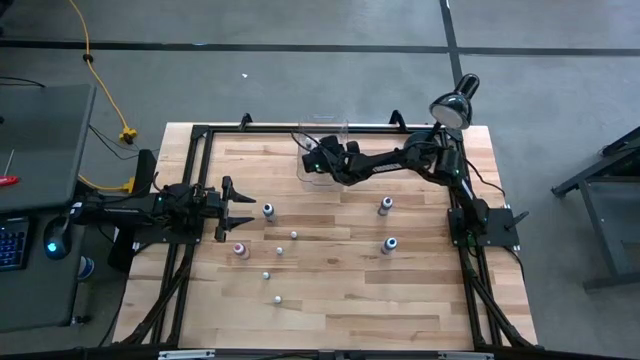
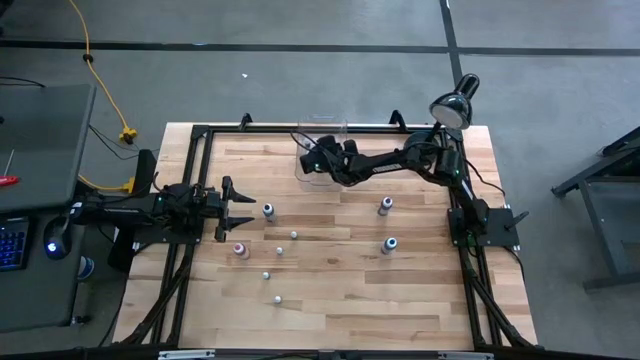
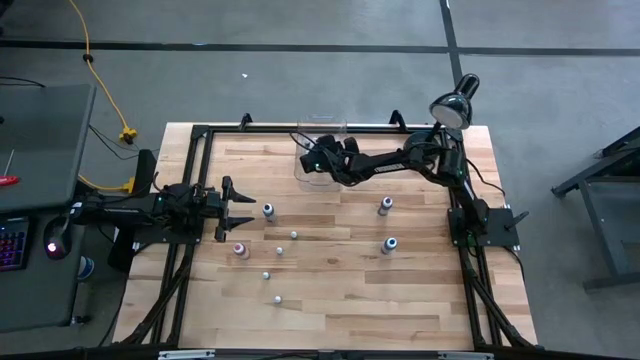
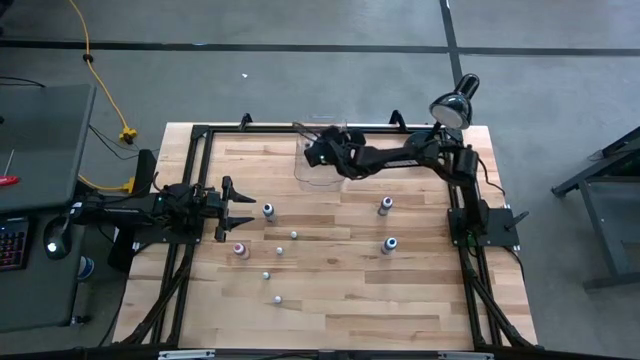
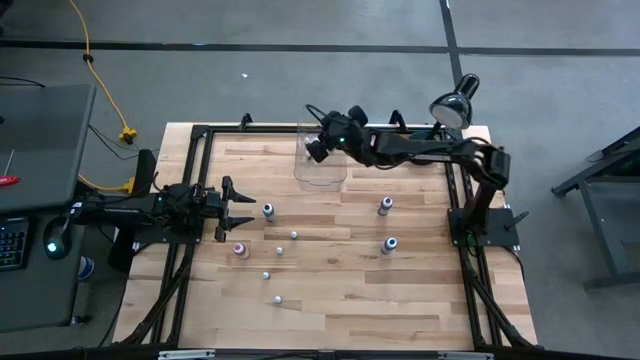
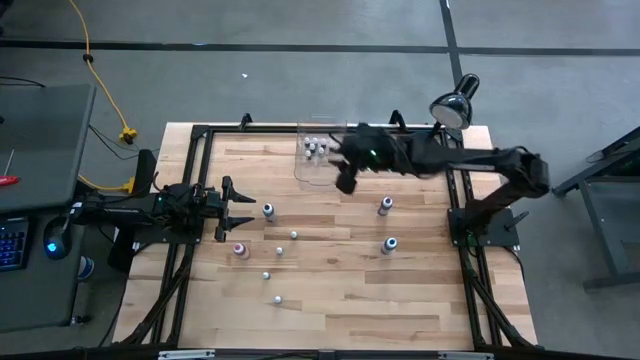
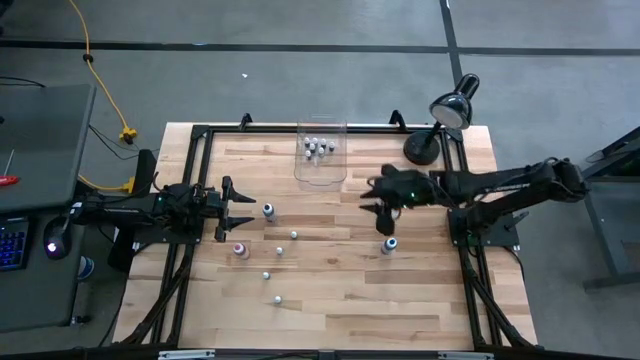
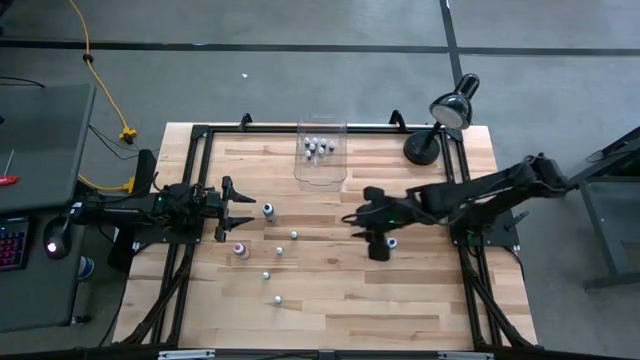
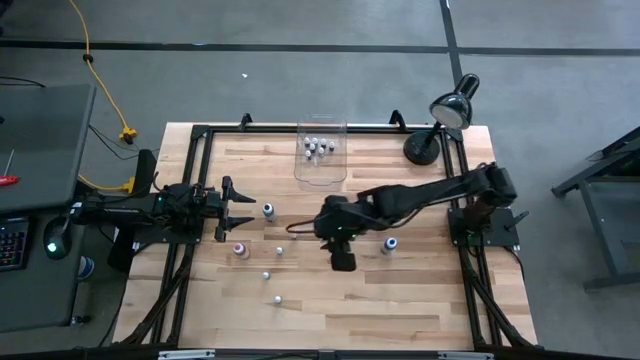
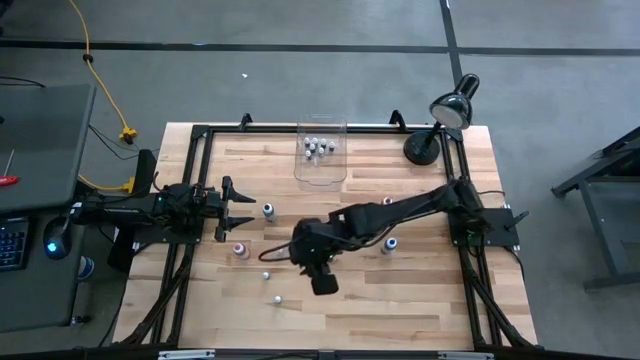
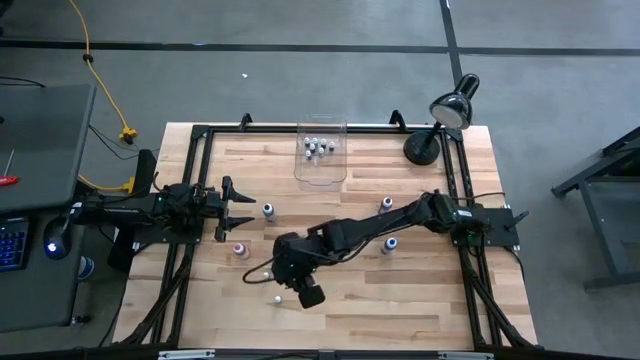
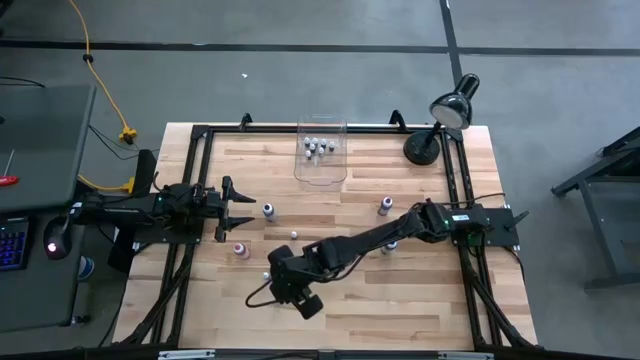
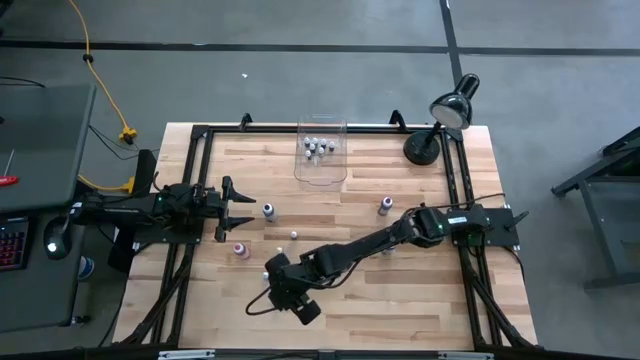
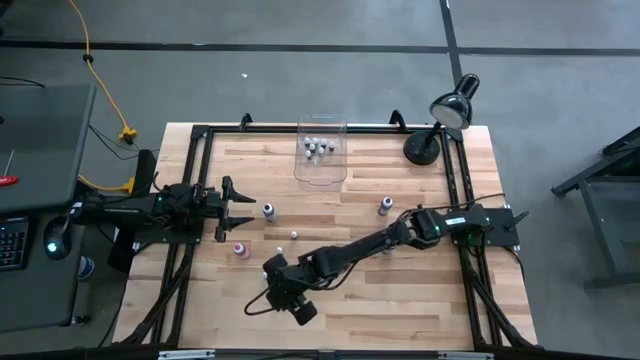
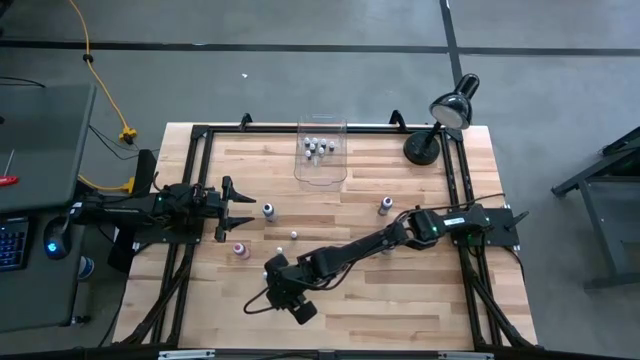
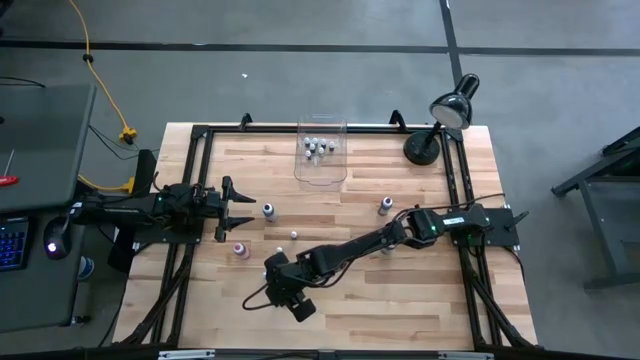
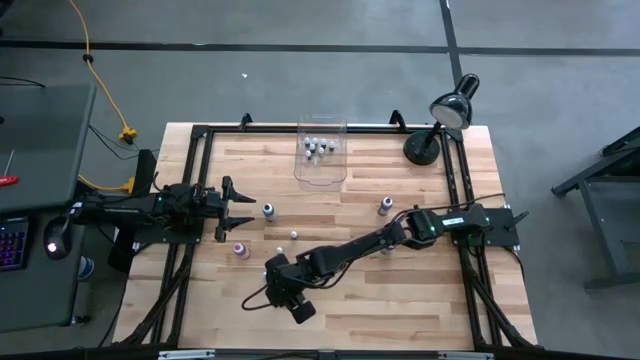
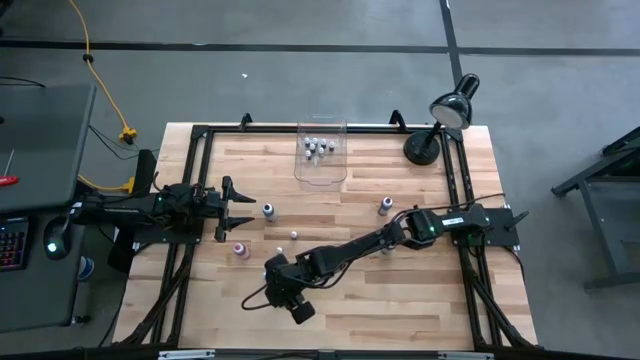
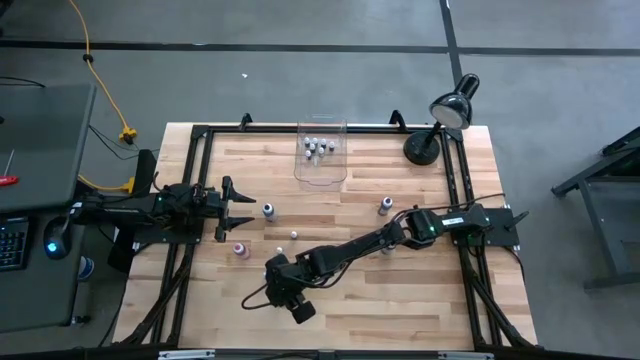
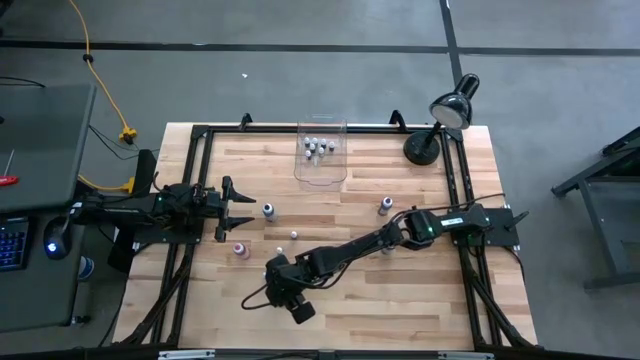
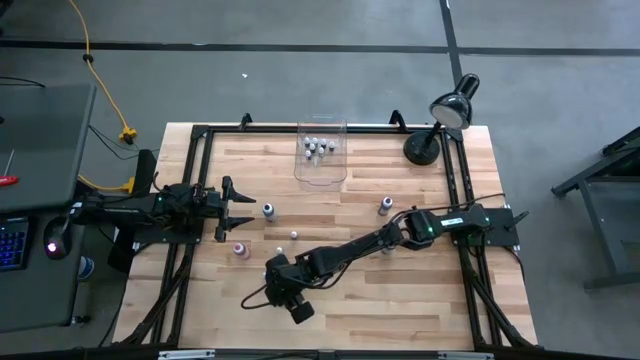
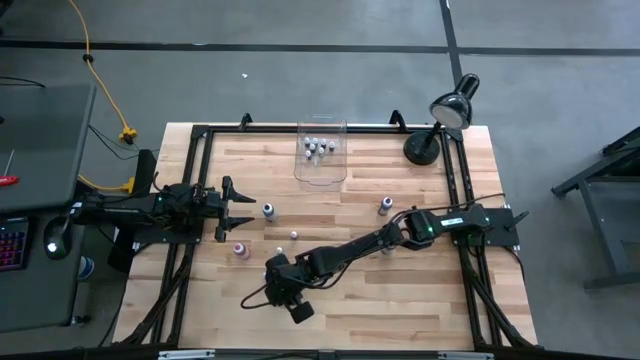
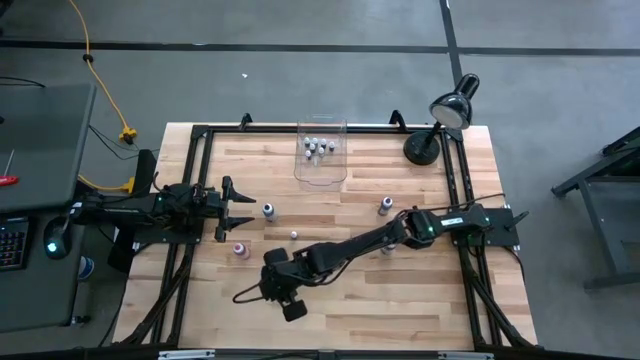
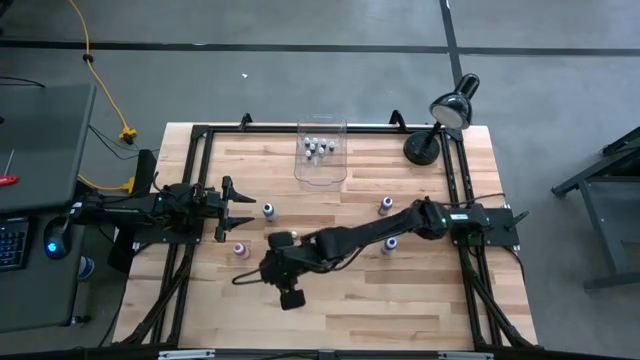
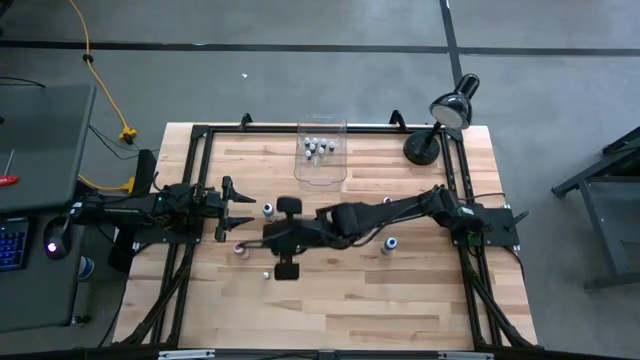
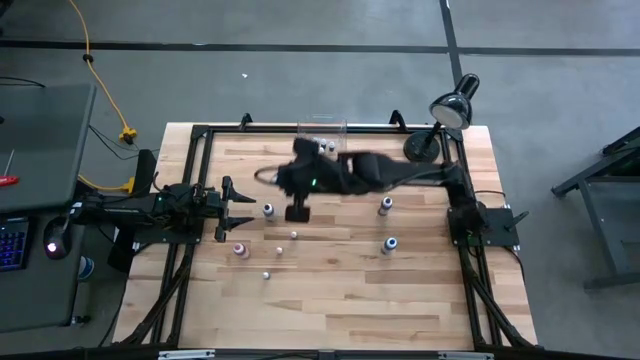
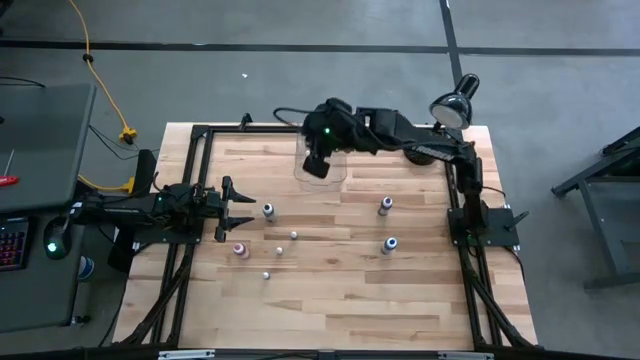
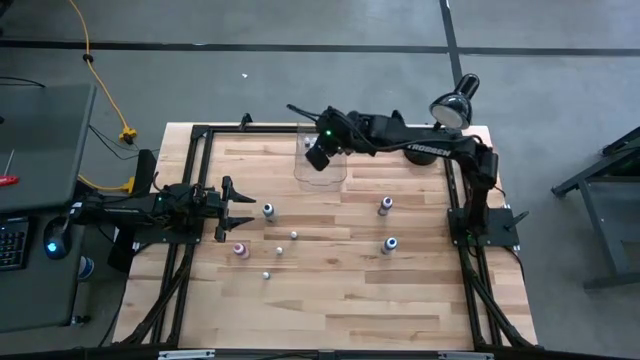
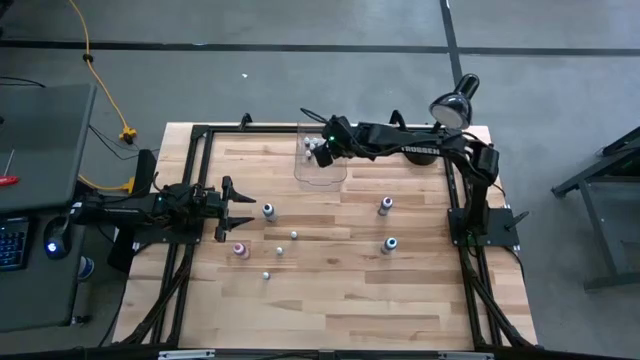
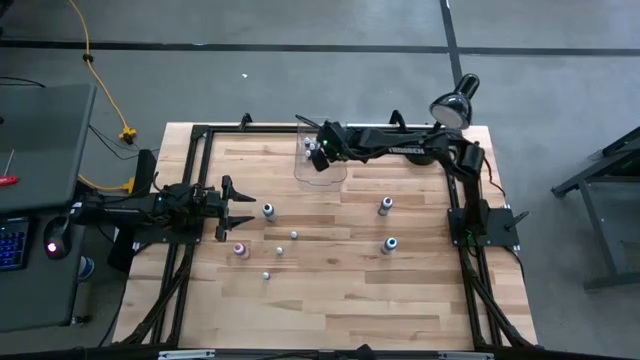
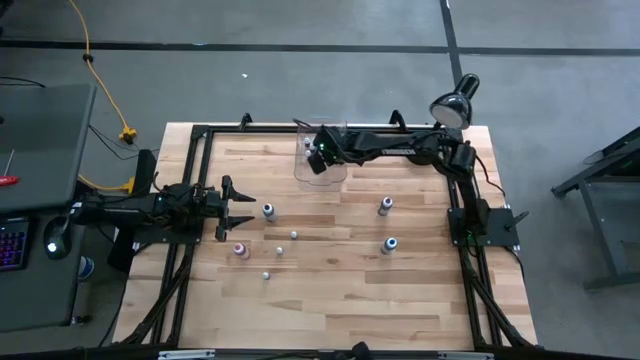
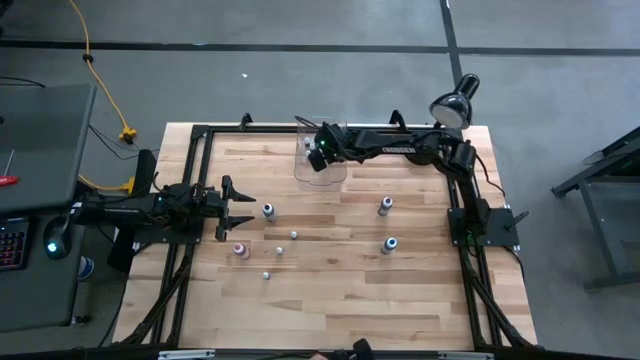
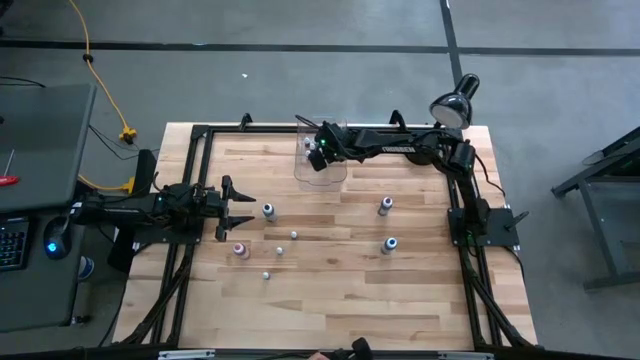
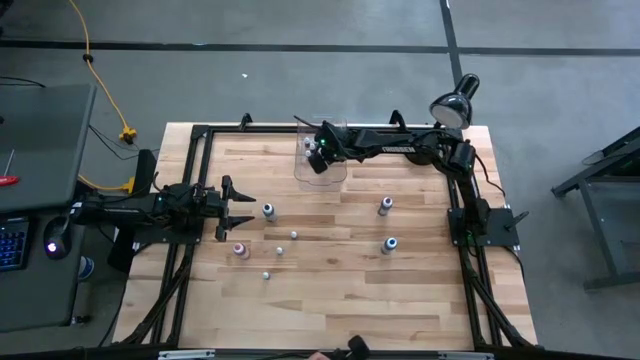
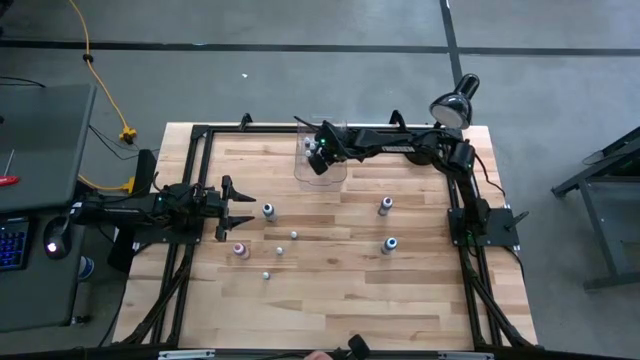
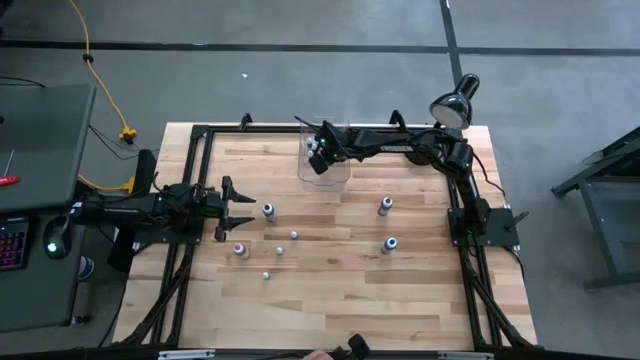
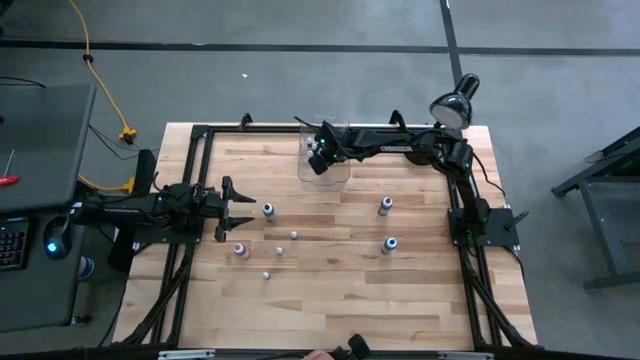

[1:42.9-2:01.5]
Task: Pick & Place food coloring
Put the small food coloring bottle into the transparent bin

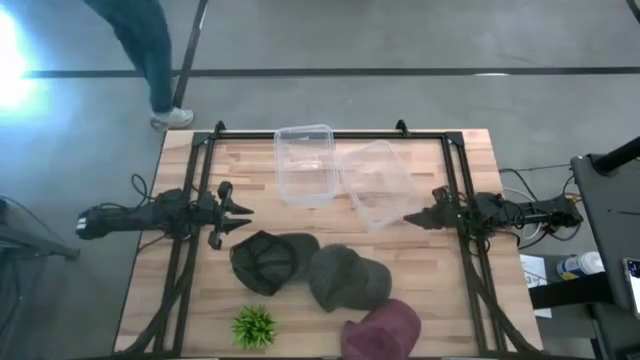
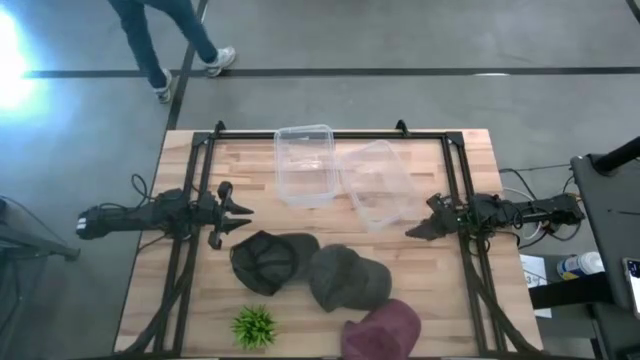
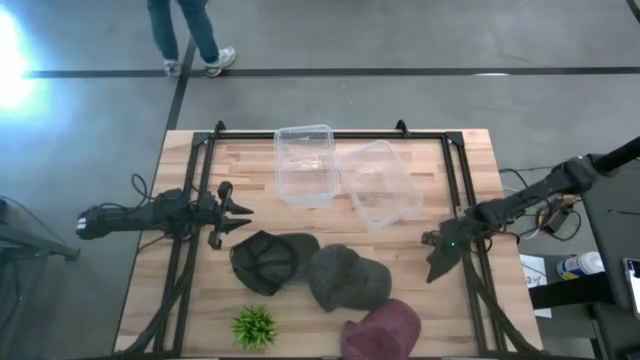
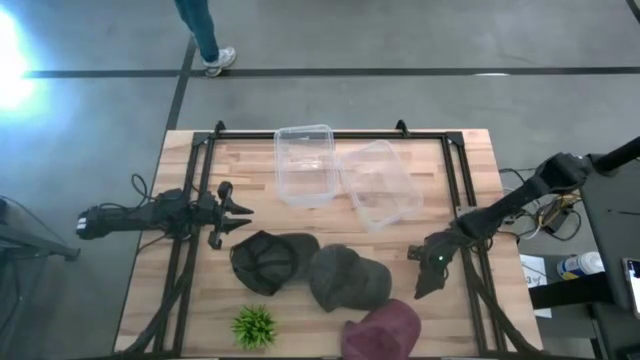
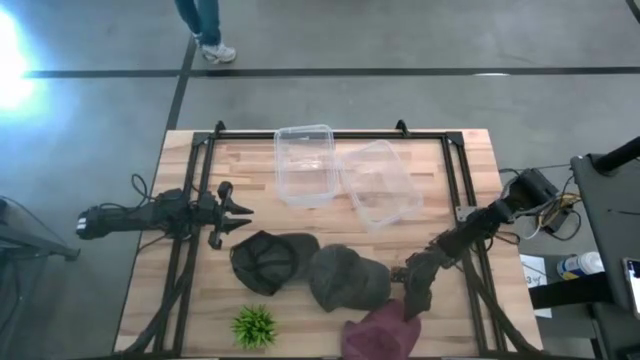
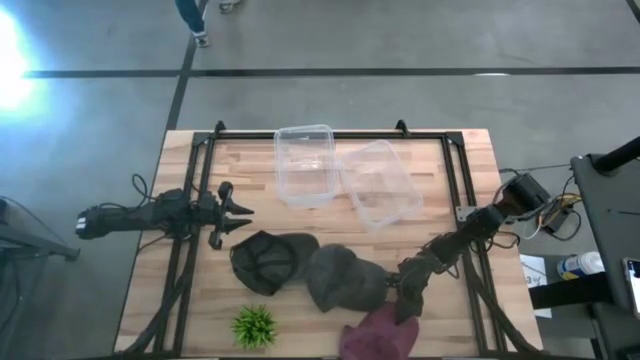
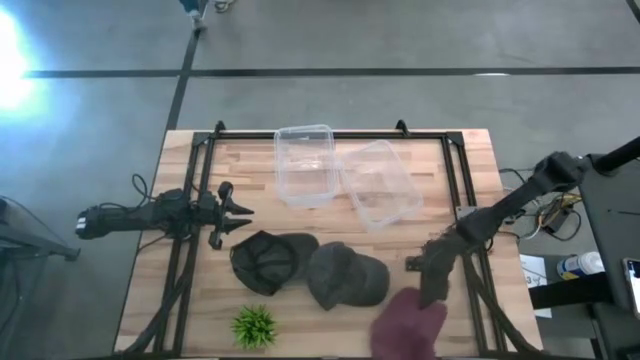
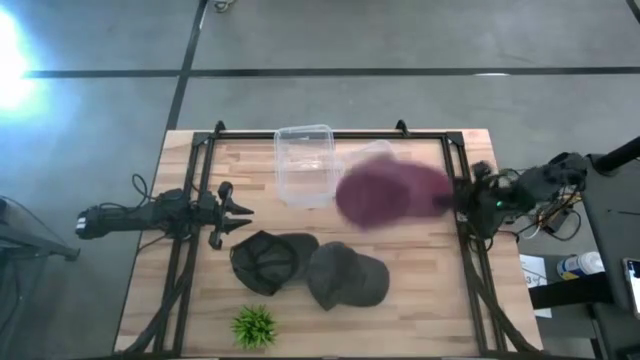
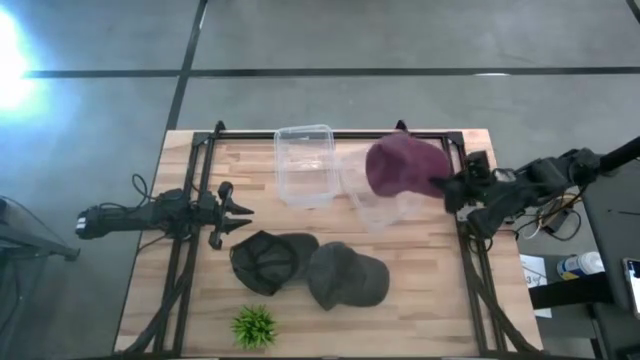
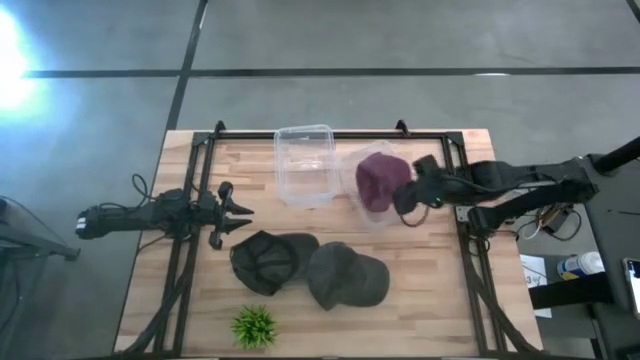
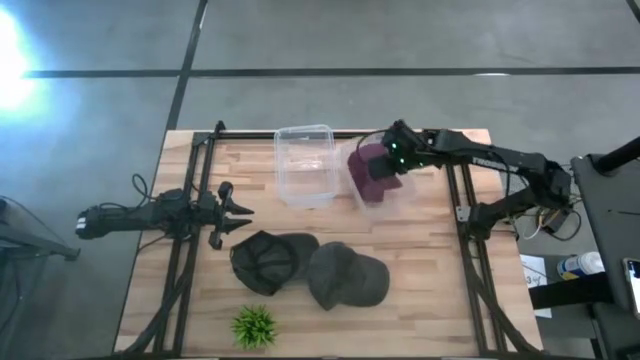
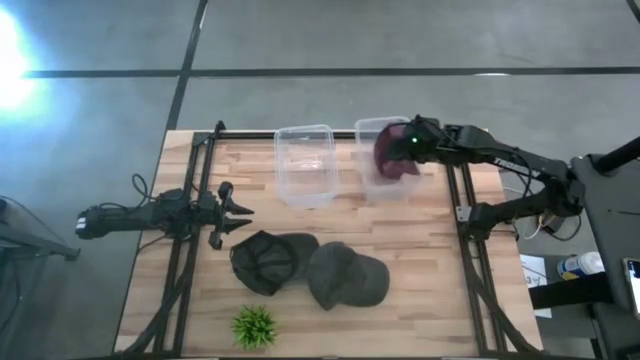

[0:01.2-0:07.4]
Task: Pick & Place hat
Put the red cap into the right transparent bin
